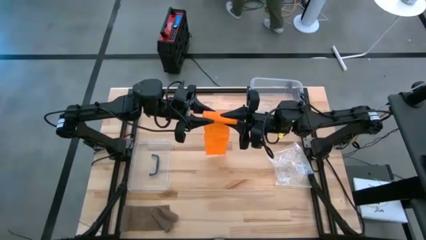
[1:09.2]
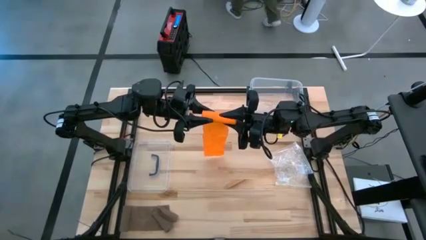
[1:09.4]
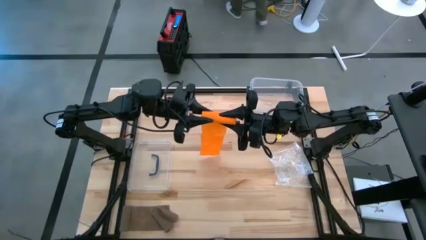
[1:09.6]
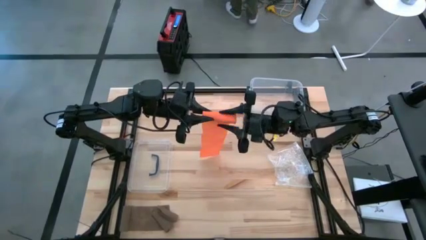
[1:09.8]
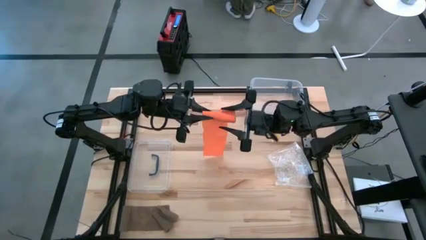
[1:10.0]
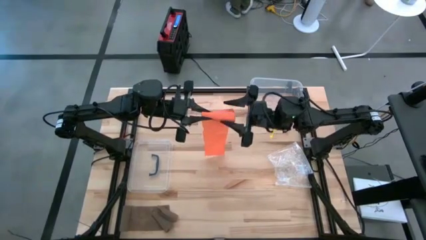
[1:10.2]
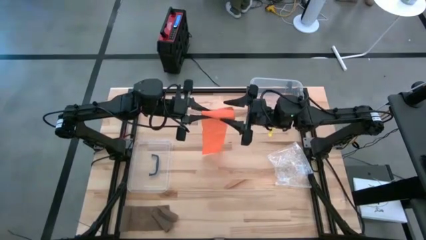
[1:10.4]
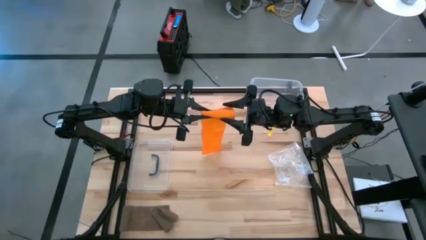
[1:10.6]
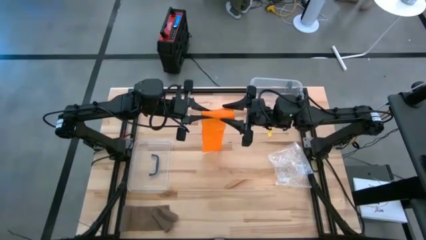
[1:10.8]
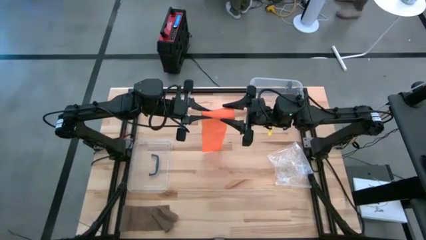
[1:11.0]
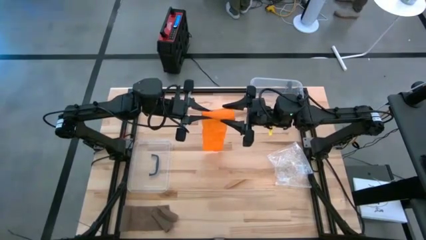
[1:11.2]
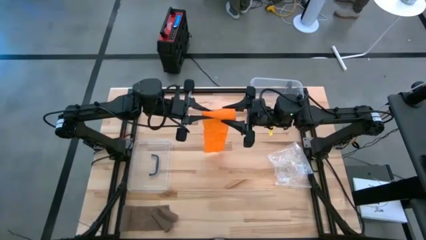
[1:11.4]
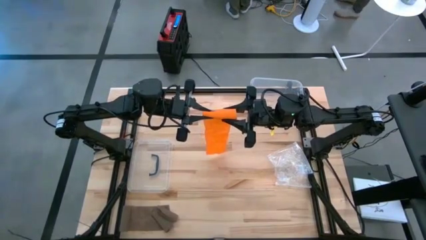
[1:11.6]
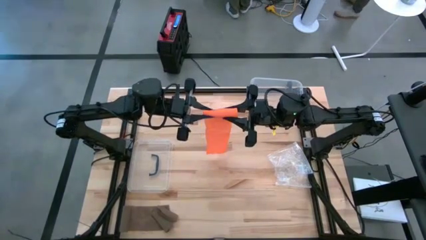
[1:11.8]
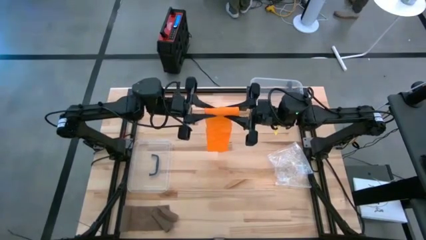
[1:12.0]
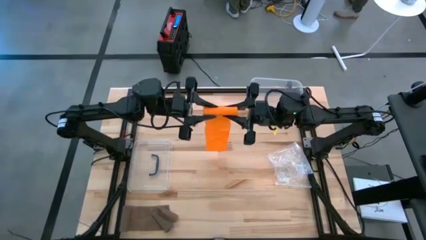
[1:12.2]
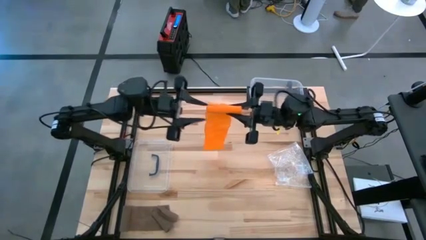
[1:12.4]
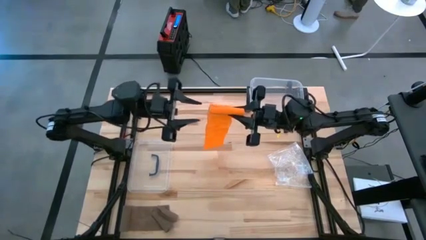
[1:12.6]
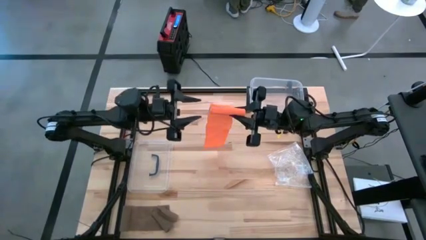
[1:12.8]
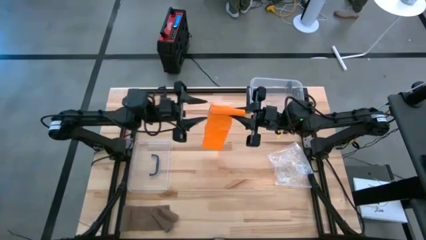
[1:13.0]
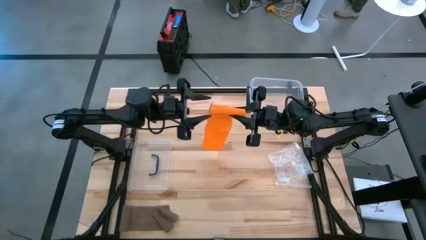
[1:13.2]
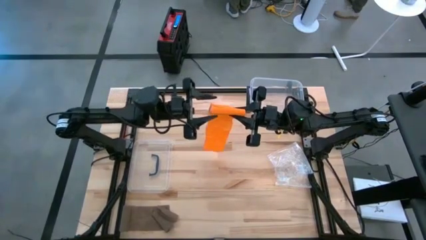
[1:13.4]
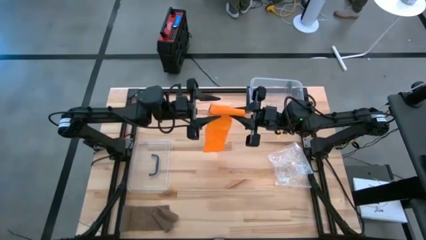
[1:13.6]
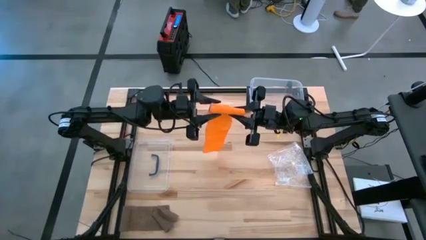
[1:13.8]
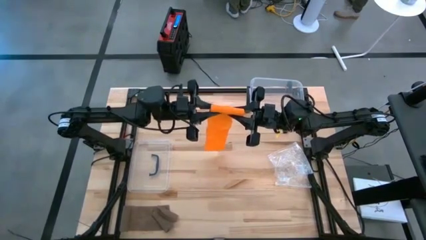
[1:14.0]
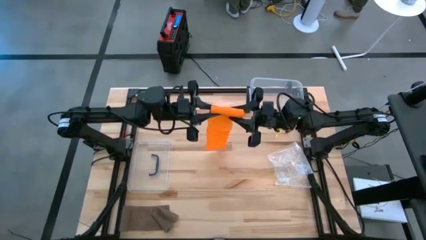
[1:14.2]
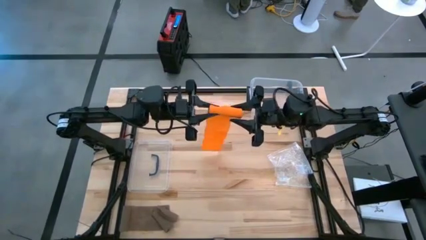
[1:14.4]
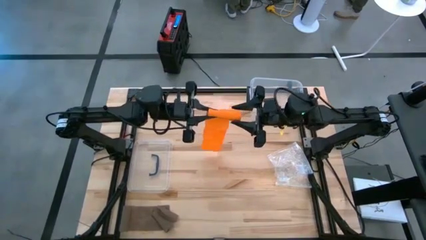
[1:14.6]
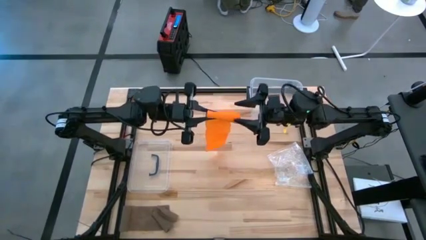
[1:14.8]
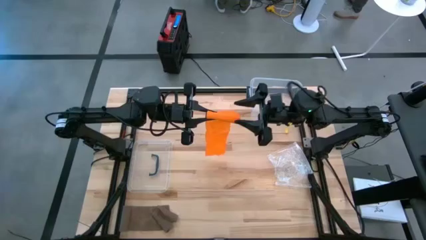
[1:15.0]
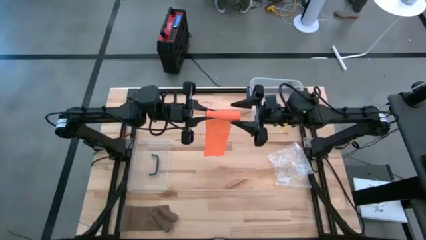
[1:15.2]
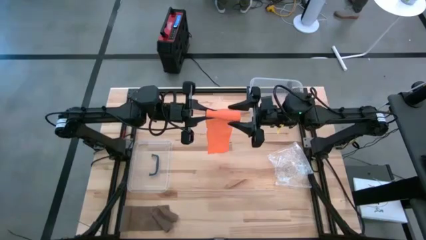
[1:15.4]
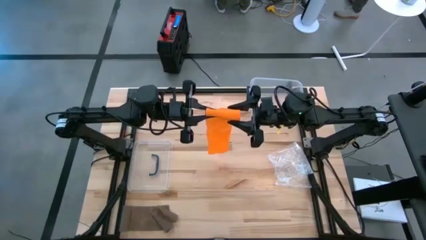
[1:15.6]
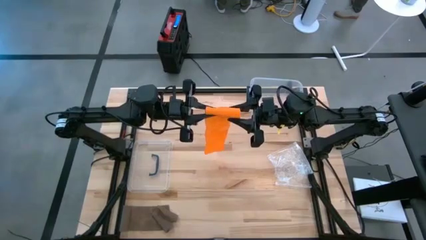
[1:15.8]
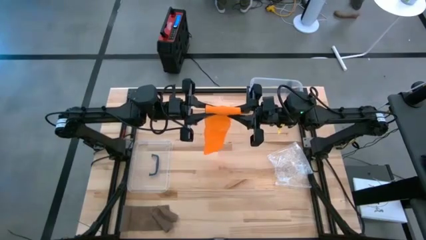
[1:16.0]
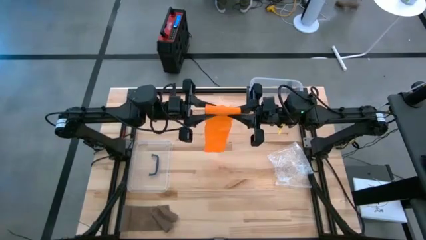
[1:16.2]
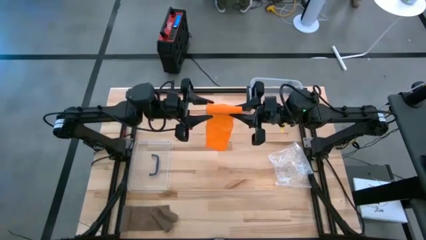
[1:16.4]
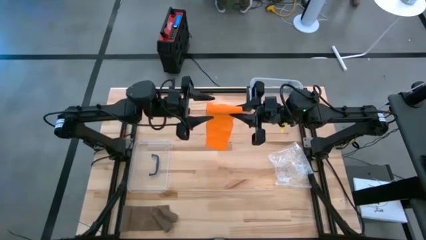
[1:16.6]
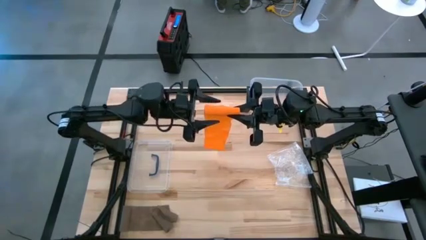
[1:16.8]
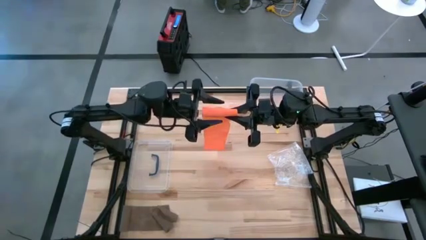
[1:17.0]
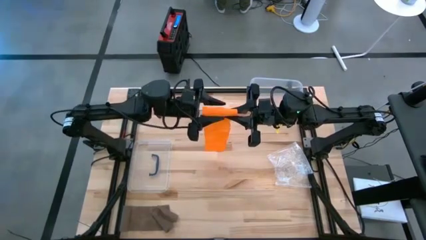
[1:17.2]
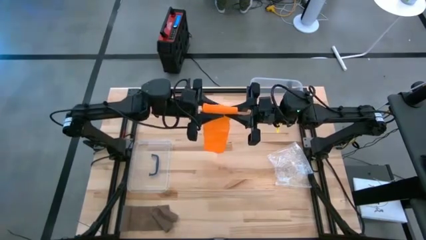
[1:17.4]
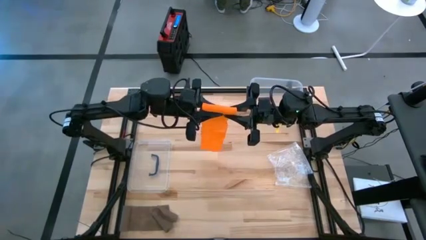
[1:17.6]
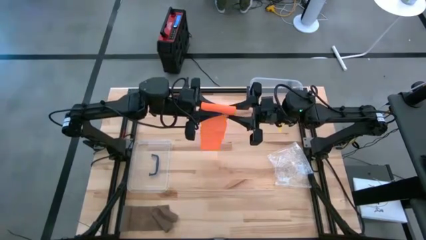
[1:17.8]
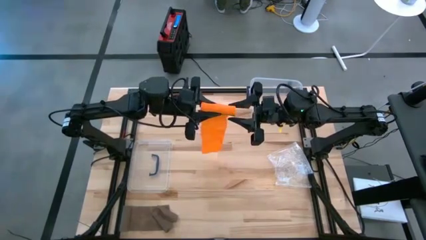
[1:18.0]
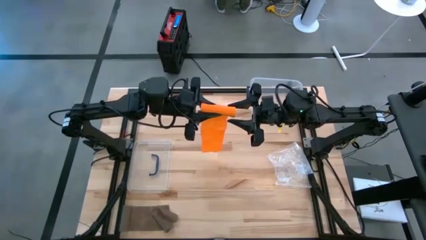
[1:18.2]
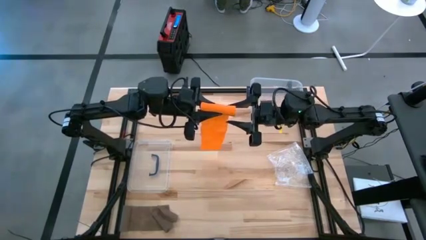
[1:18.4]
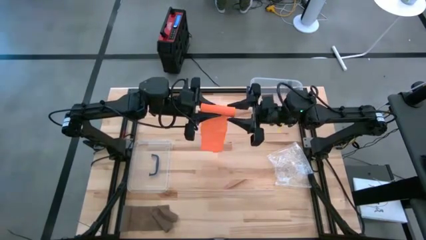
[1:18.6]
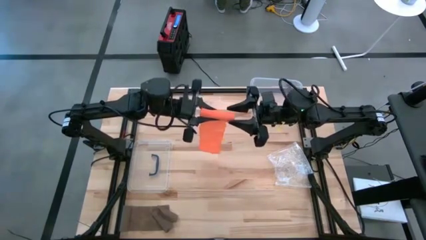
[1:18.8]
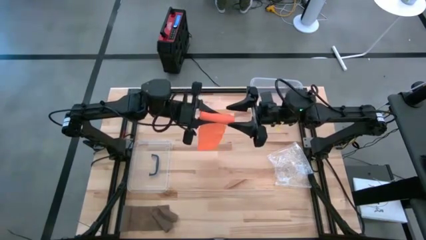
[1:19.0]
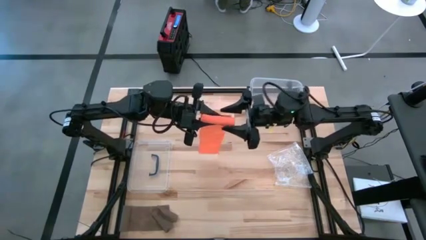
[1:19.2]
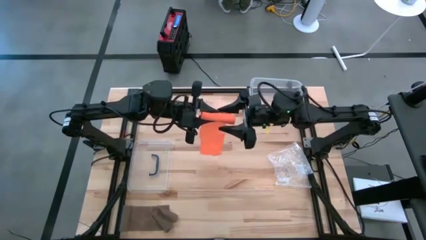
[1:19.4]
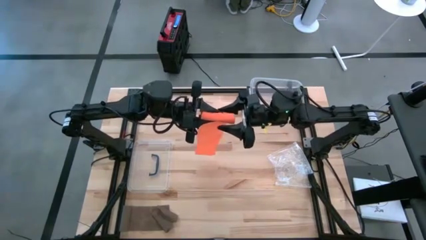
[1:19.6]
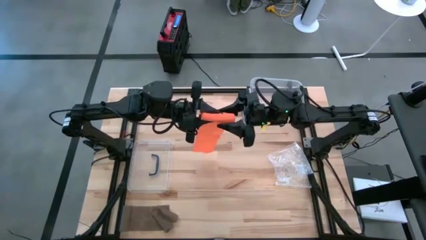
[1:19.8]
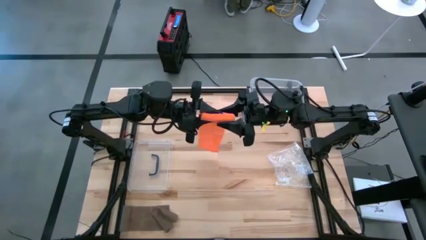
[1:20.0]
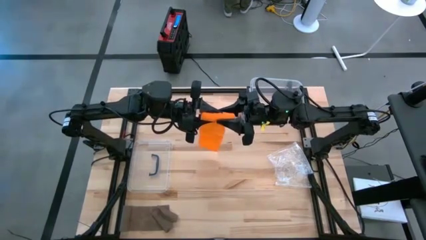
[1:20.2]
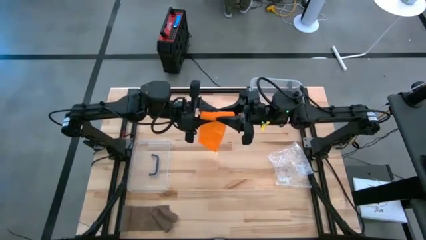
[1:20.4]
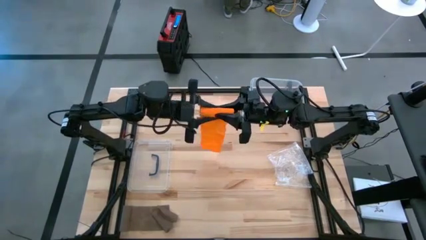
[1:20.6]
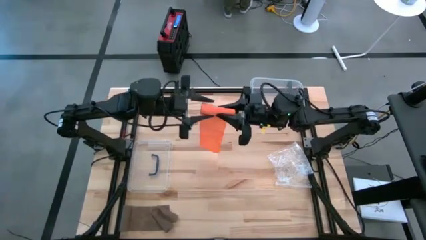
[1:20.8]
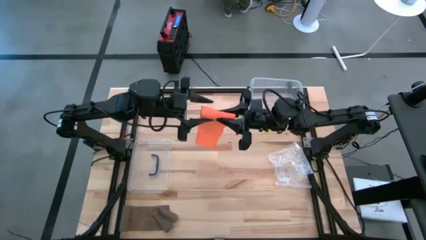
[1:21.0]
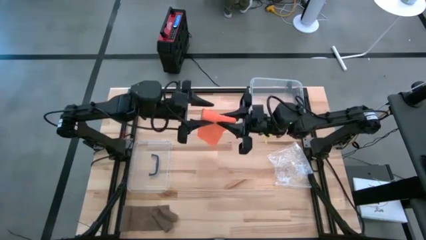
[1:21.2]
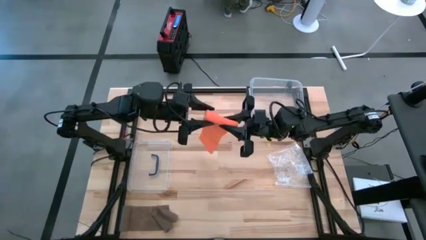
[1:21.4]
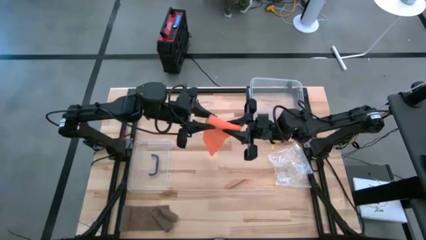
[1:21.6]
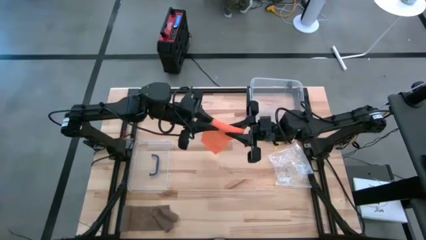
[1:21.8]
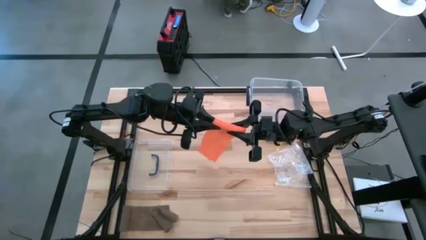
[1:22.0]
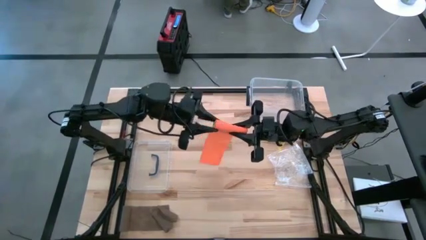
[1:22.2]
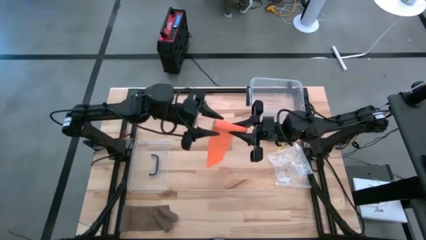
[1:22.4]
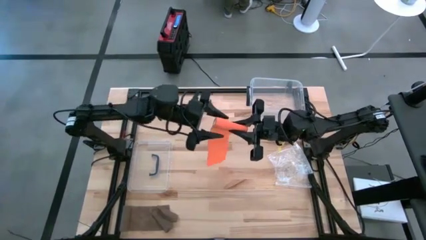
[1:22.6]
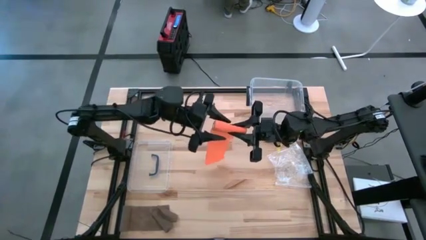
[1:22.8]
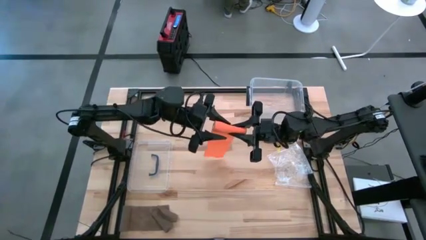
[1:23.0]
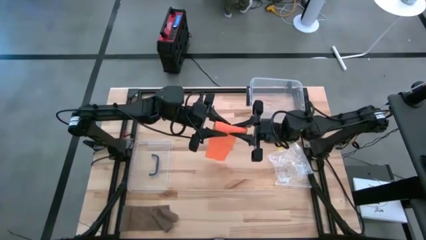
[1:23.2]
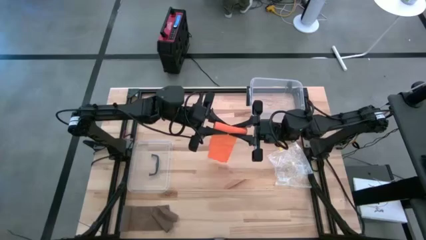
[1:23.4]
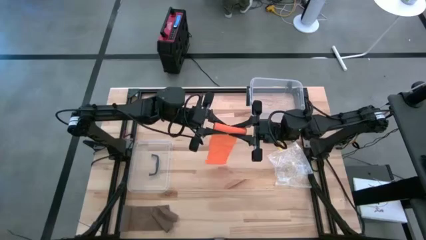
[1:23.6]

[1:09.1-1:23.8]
Task: Roll bandage
Roll the orange bandage

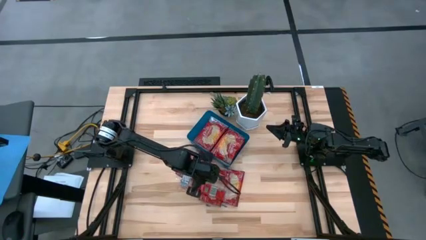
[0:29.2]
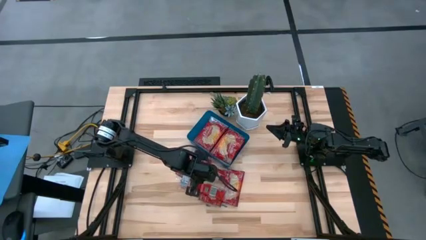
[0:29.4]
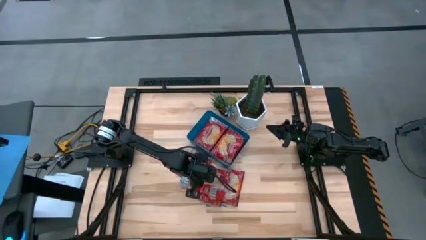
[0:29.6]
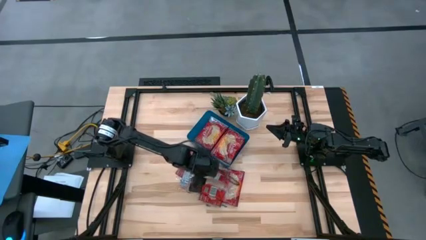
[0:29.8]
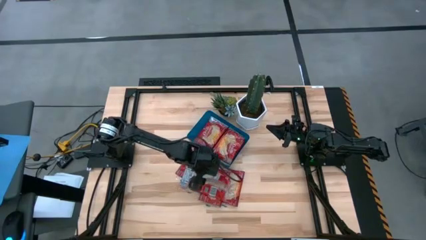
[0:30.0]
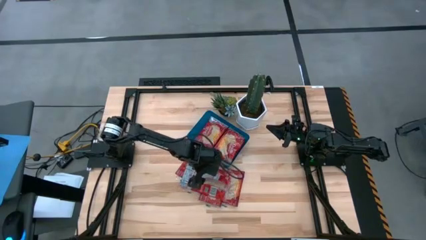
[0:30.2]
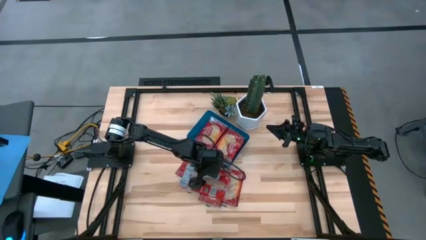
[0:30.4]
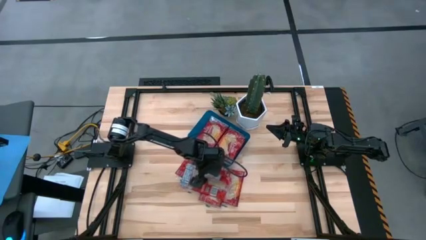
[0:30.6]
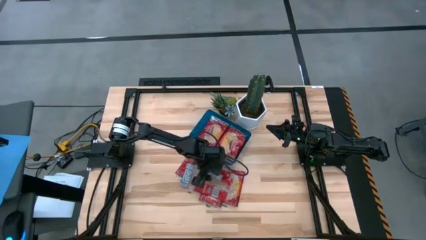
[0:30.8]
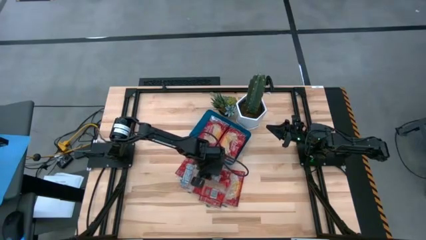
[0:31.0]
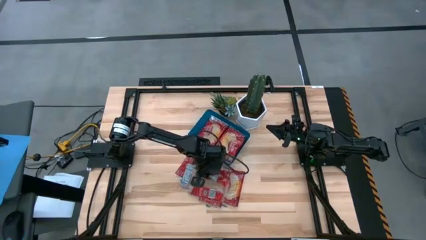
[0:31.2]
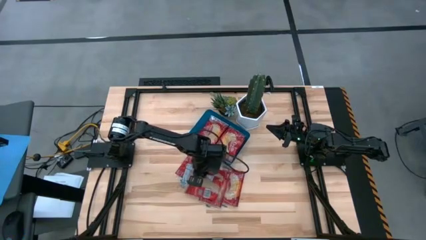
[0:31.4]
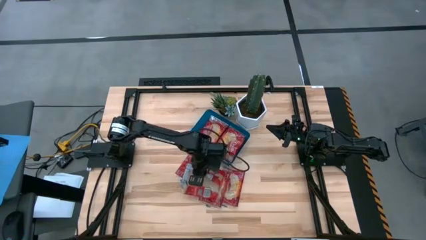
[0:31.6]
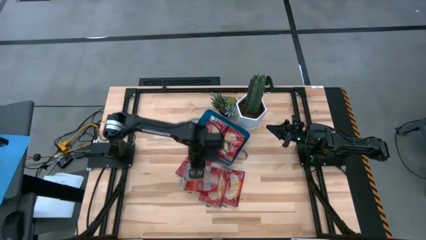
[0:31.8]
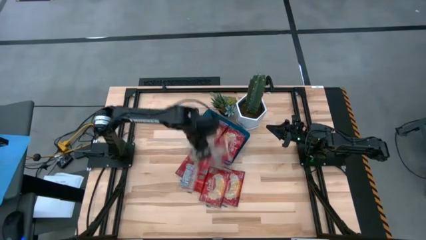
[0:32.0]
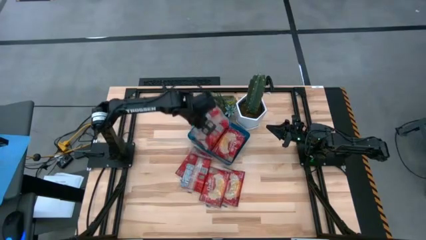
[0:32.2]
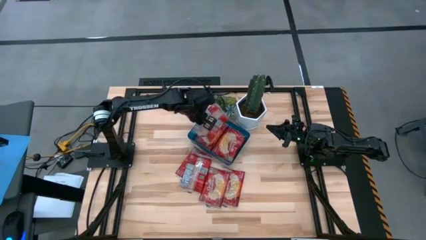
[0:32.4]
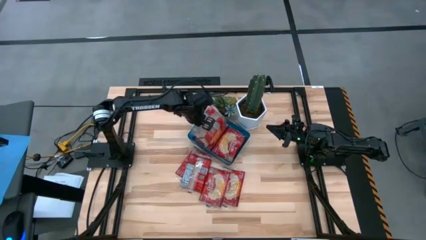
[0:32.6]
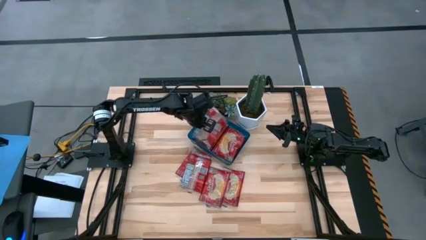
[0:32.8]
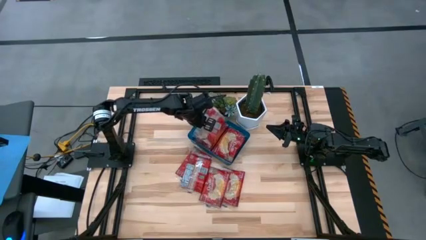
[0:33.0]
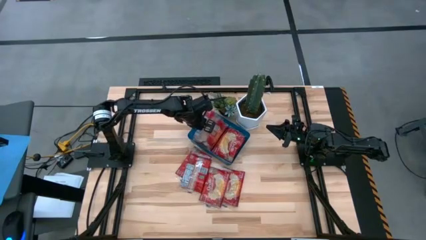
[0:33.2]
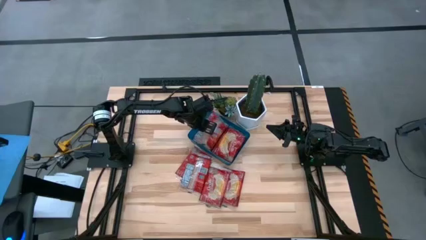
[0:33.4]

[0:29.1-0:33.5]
Task: Sort popcorn bags into baskets
Put the popcorn bag into the blue bin
